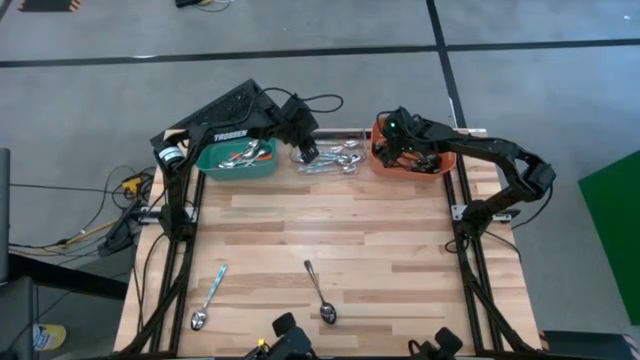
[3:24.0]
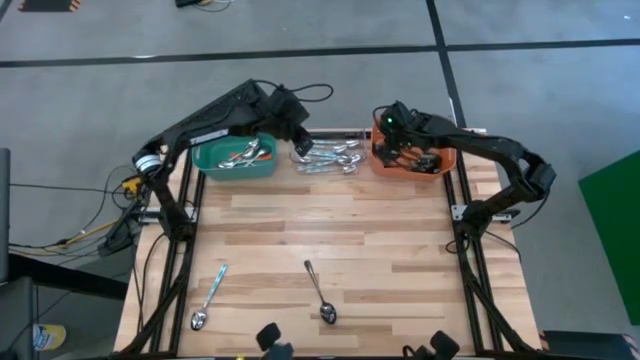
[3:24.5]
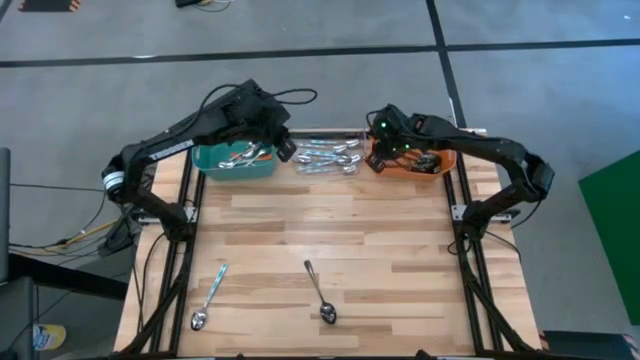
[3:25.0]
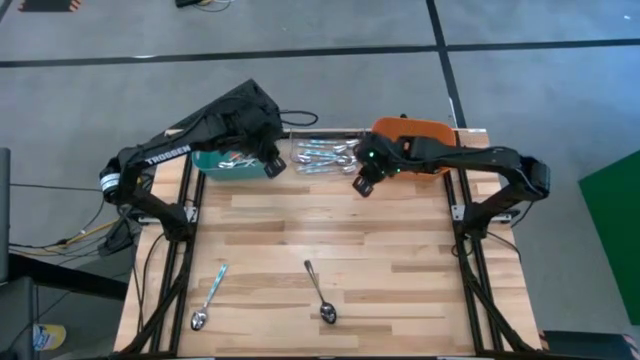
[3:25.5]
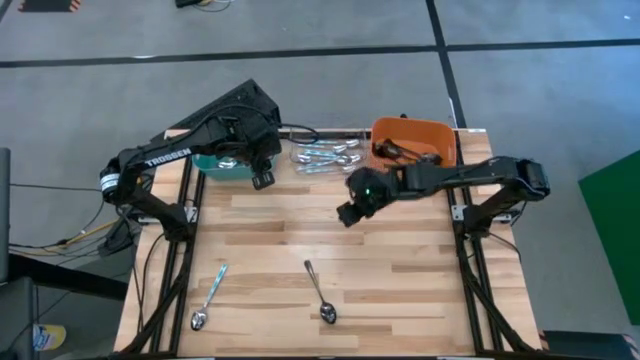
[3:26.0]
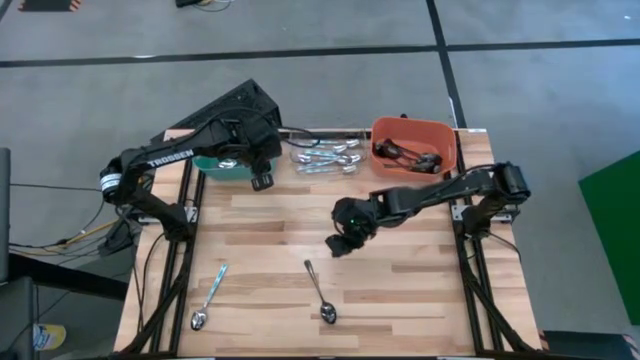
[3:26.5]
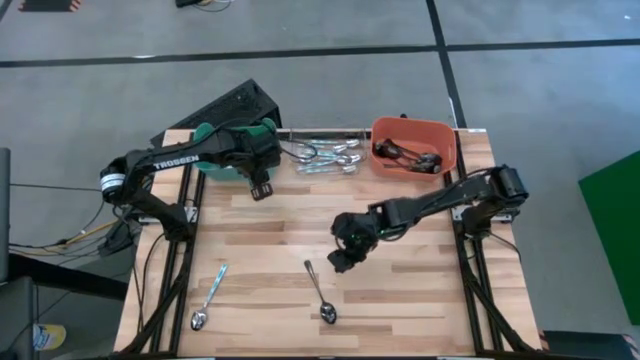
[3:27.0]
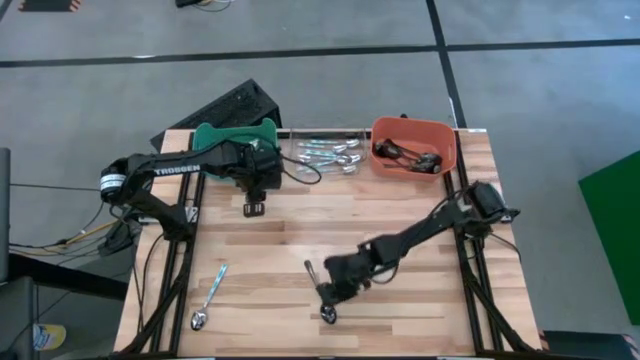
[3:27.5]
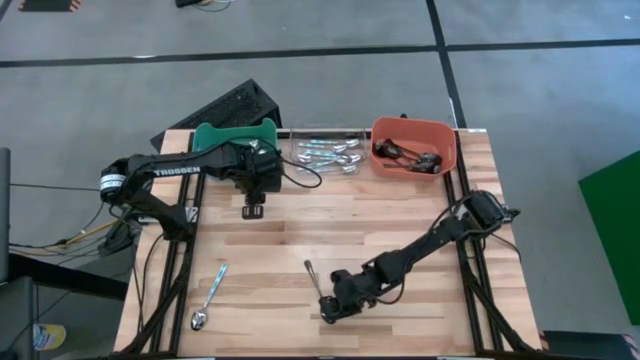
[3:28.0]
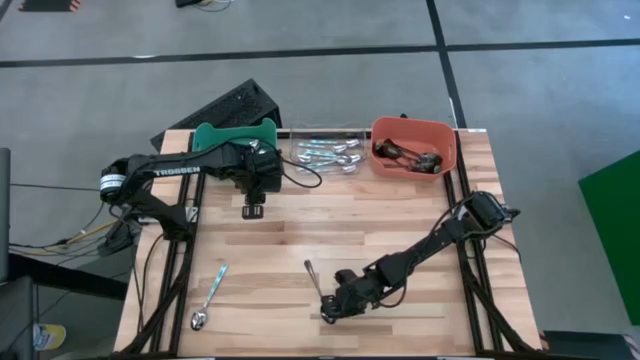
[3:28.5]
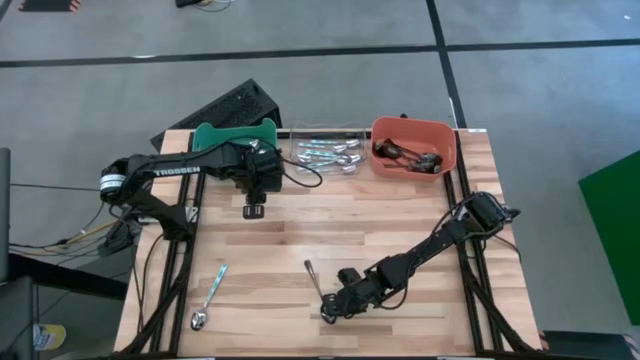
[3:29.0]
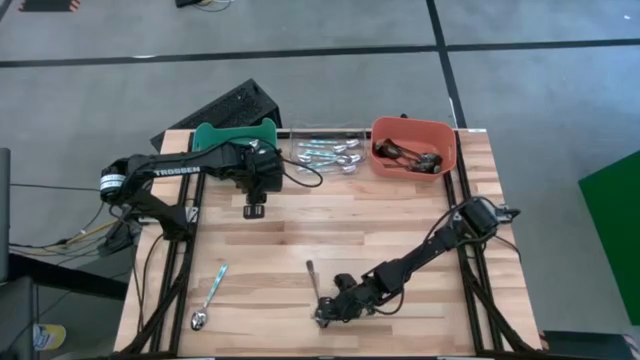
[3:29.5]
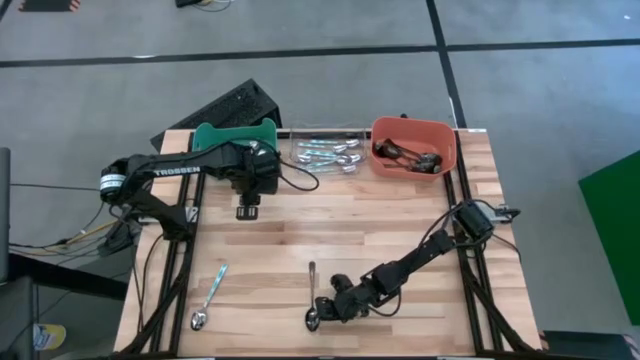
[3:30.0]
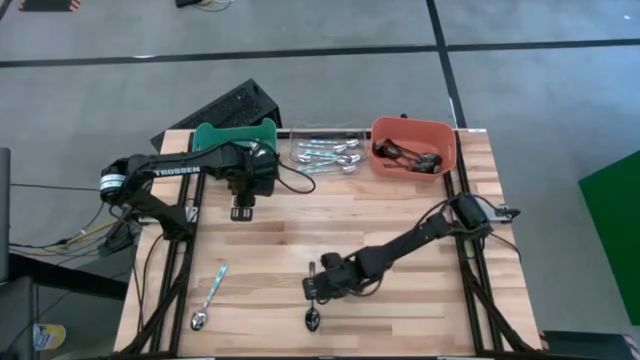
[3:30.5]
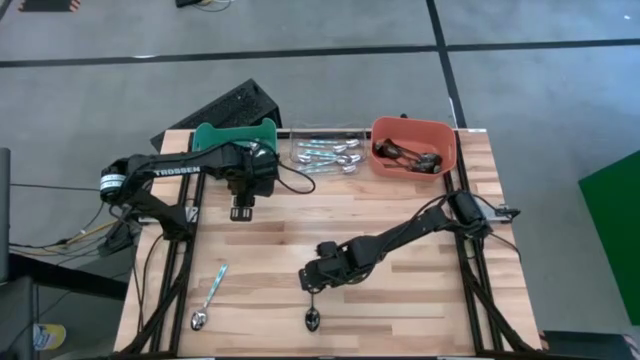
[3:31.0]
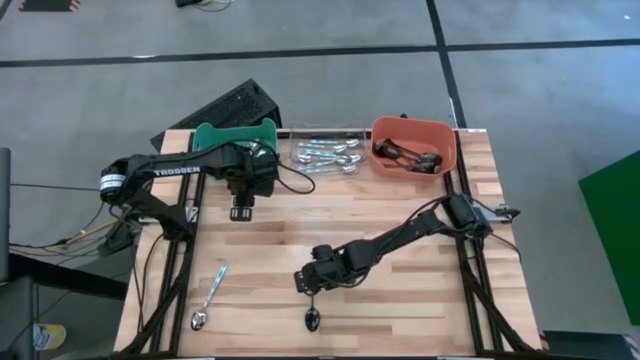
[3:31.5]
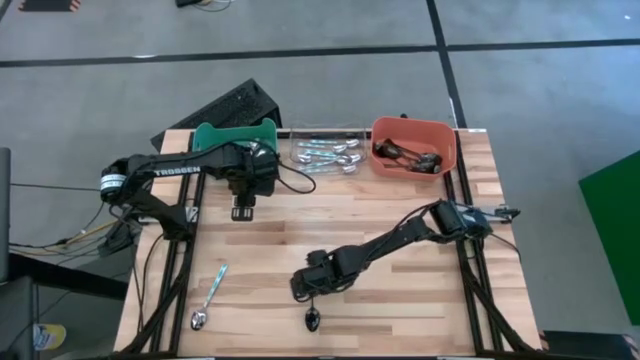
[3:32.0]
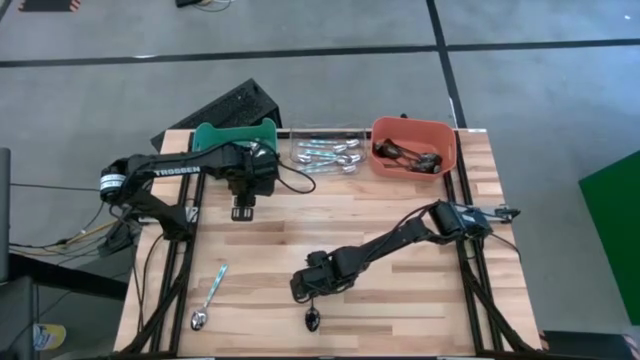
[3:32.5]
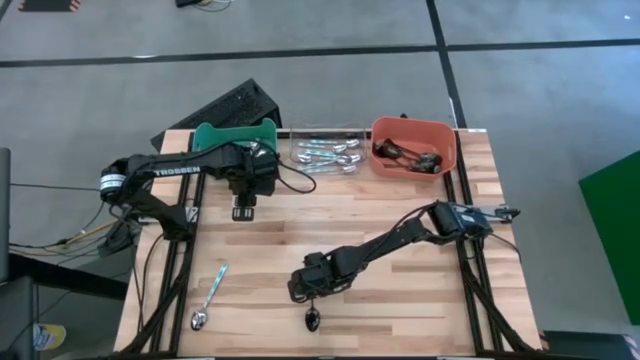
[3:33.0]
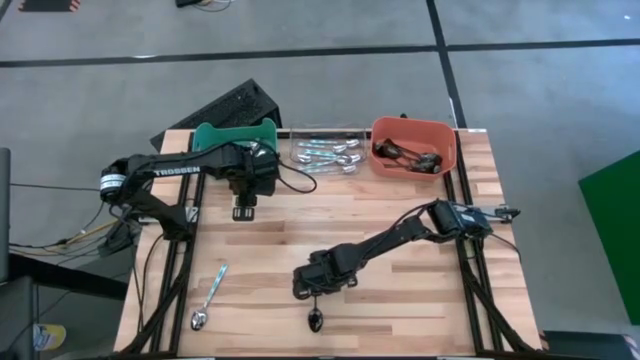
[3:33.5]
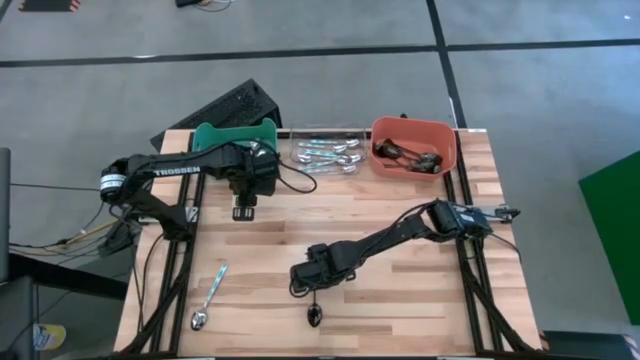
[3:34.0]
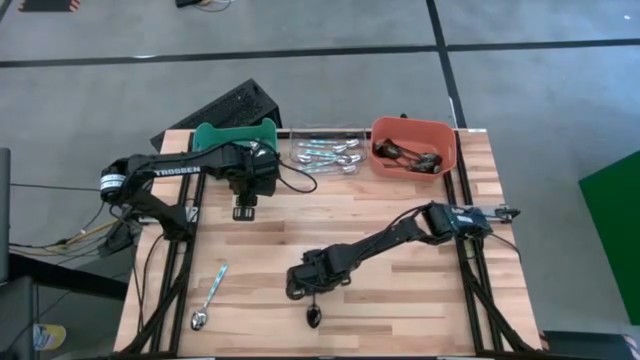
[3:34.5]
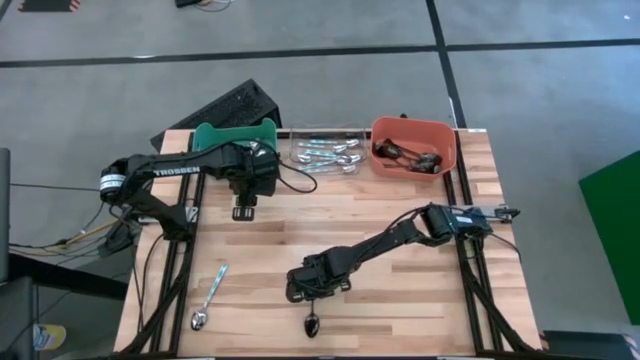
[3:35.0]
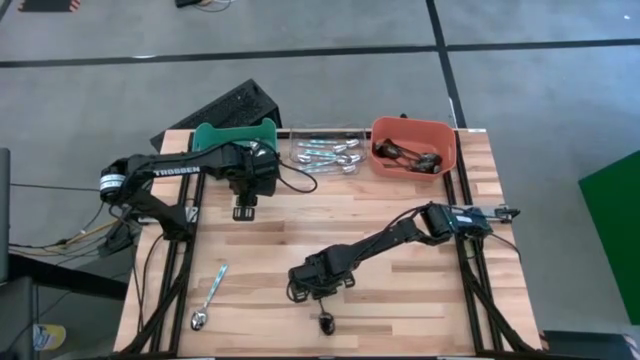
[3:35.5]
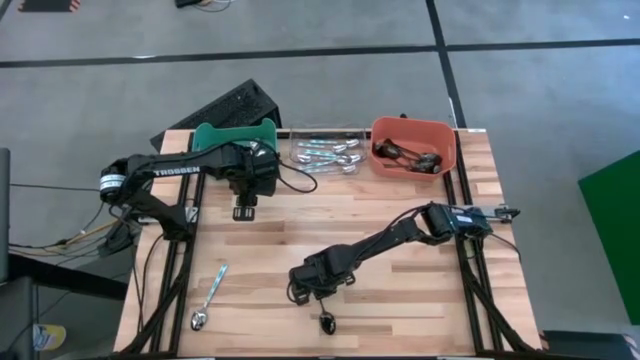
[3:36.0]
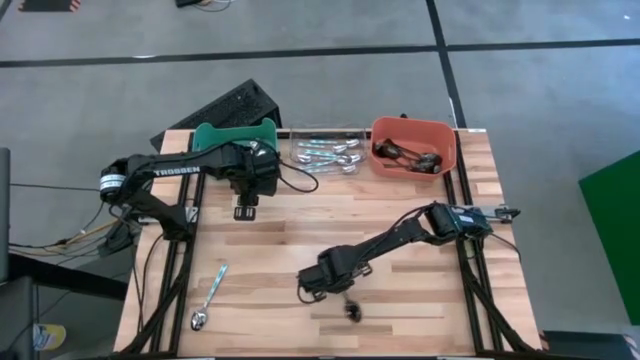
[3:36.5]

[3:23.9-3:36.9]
Task: Sort silverware by color (type)
Put the black spoon into the orange bin

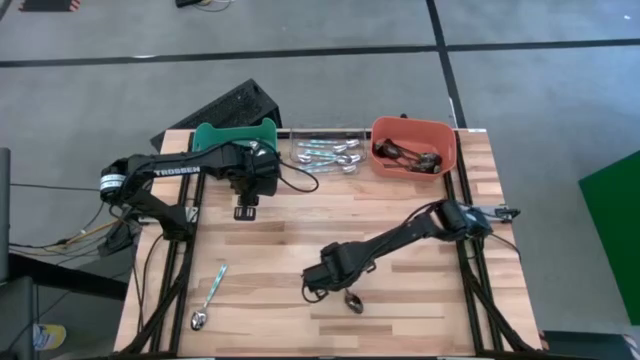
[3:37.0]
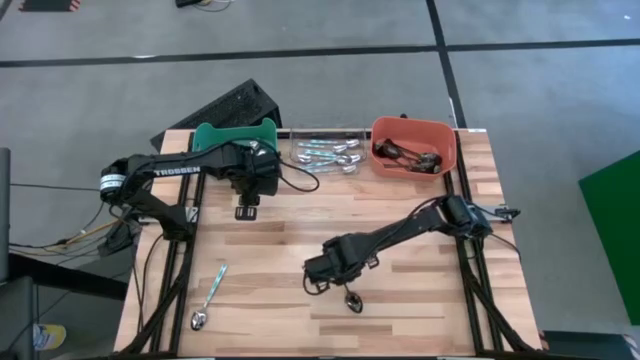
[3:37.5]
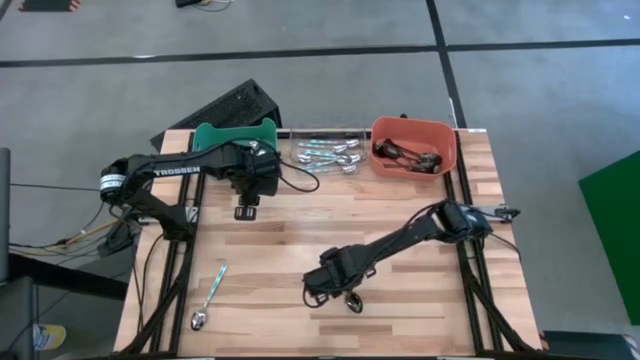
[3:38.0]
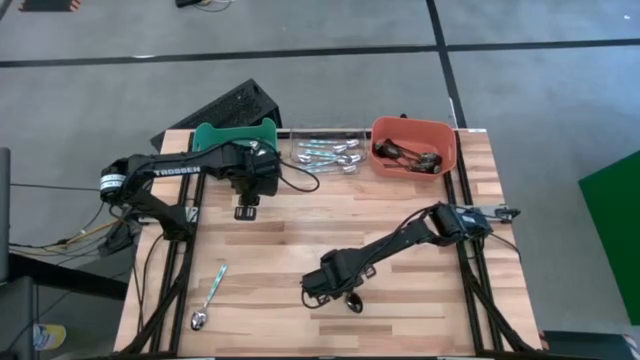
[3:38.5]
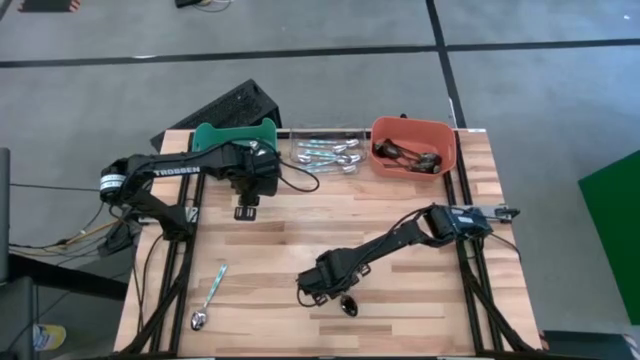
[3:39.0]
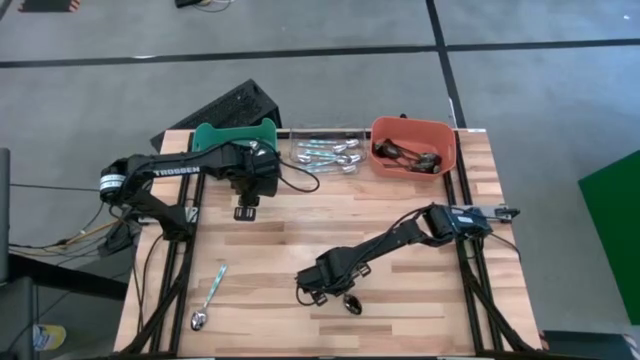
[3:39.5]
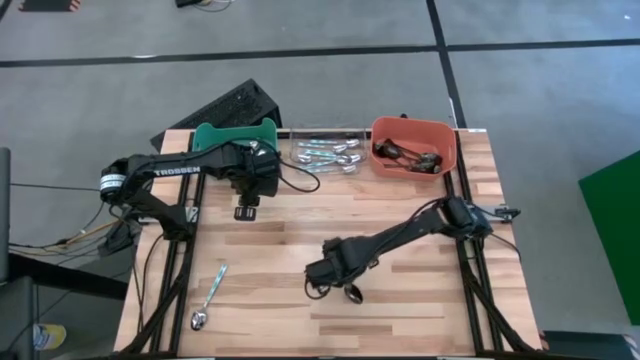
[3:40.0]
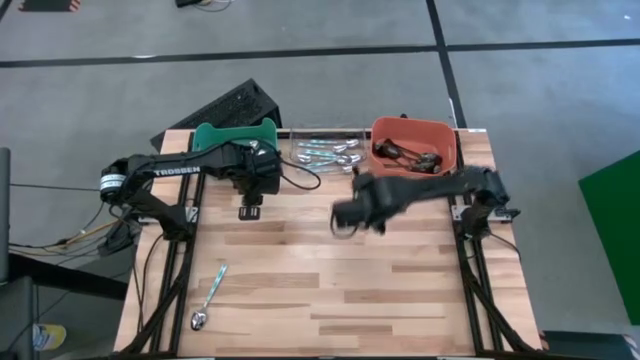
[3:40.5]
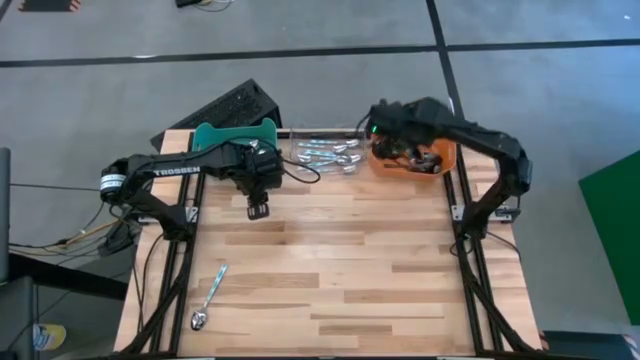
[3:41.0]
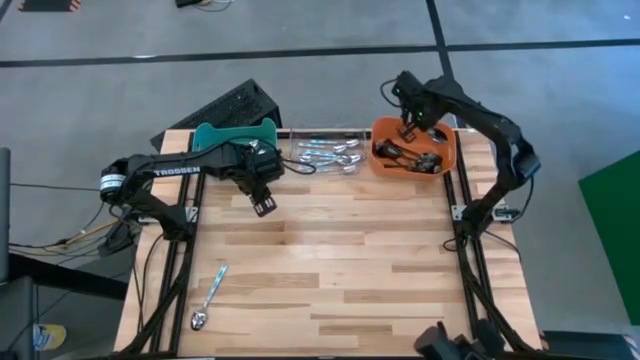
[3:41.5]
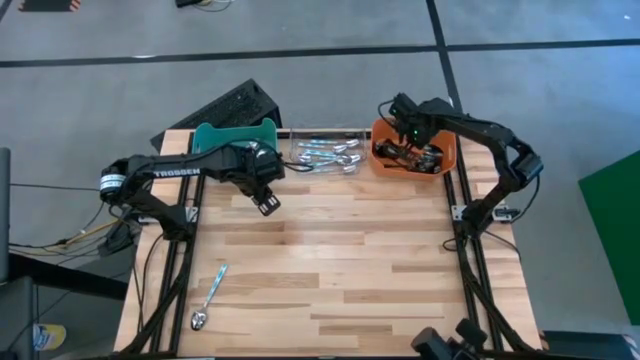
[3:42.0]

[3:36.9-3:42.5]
Put the black spoon into the orange bin

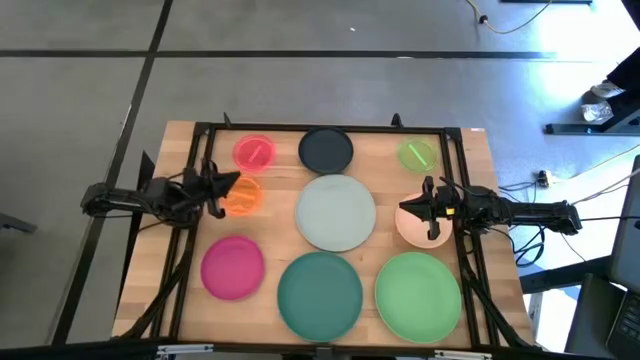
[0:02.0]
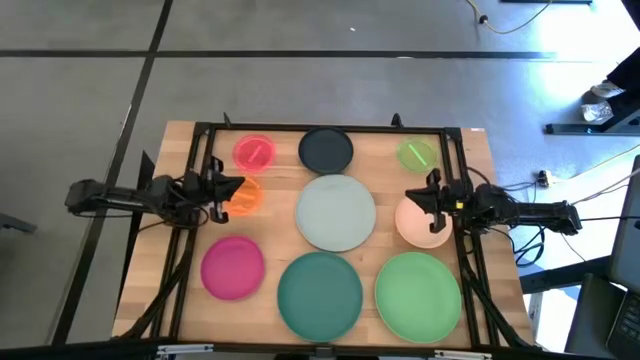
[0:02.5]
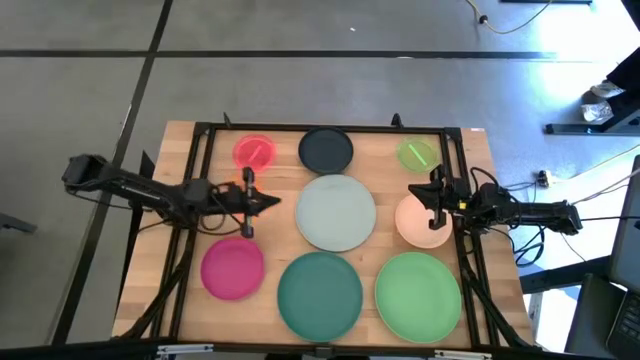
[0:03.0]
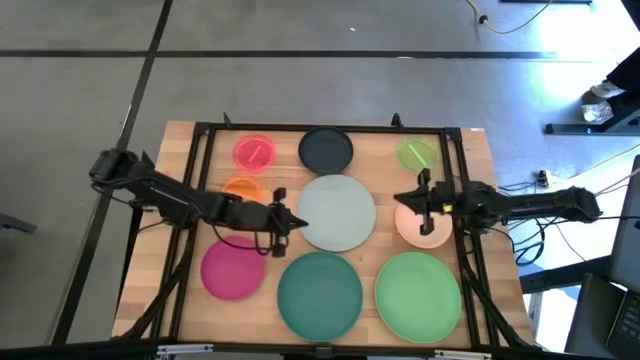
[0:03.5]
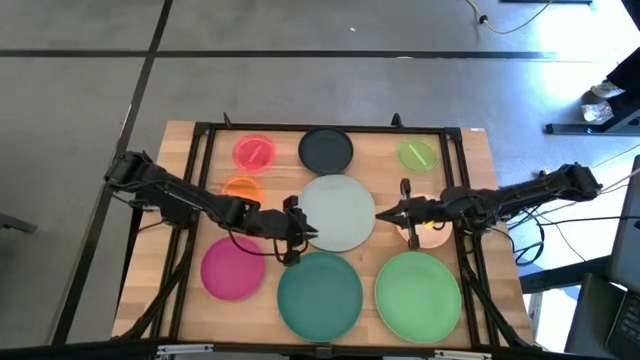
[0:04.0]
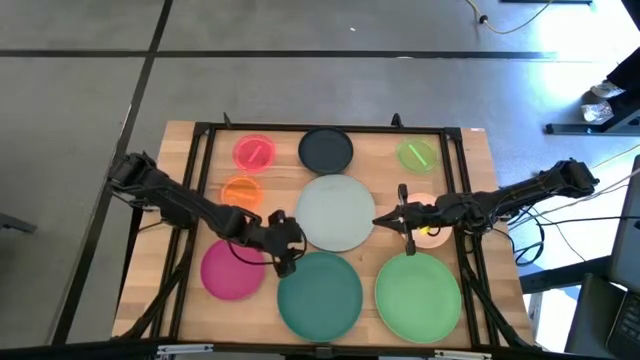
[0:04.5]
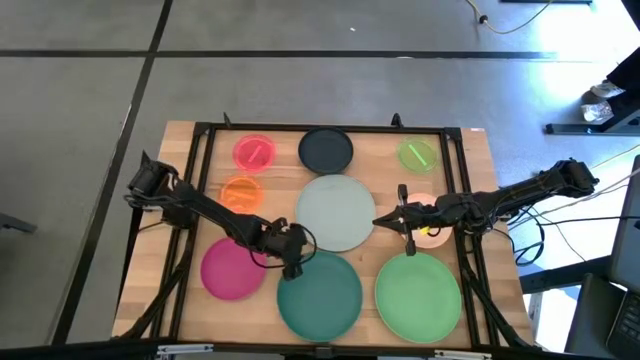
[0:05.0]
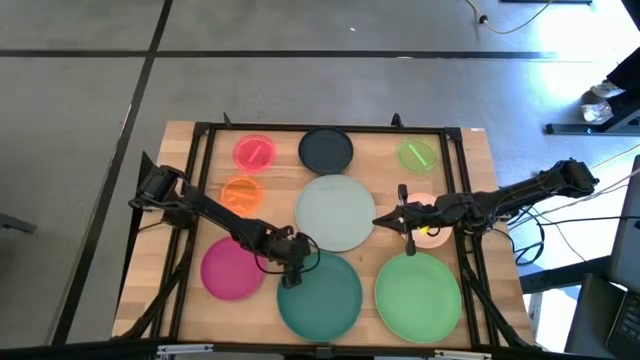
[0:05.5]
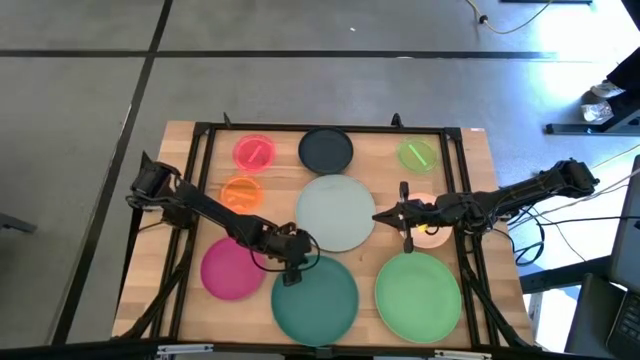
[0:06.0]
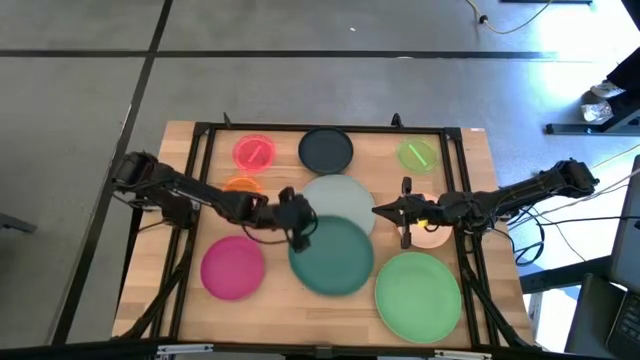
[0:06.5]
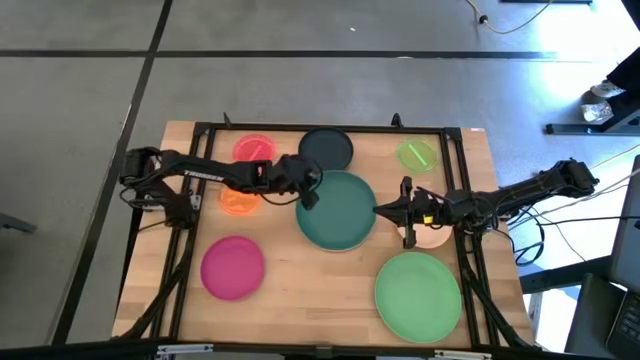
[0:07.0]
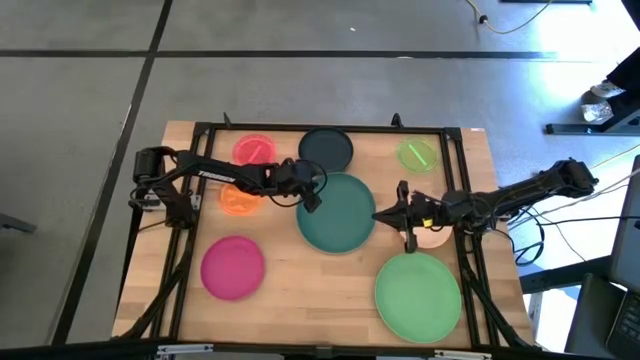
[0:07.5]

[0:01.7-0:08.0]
Task: Stack plastic plates
Stack the dark green plate on top of the gray plate
